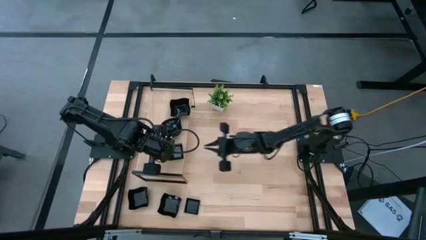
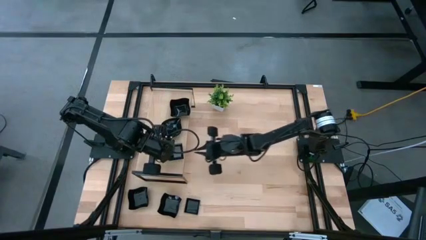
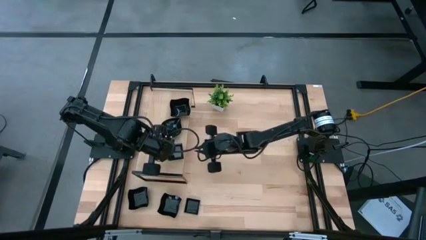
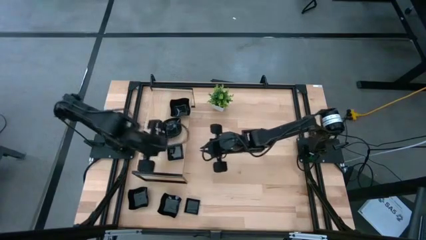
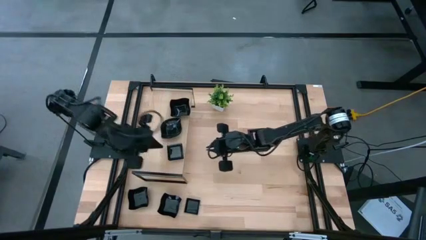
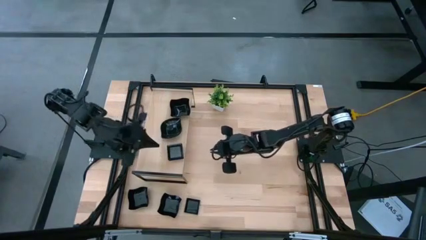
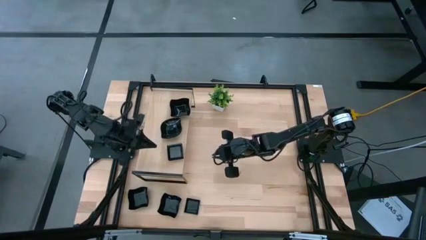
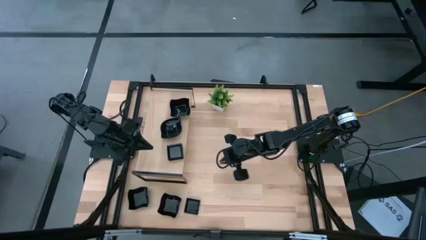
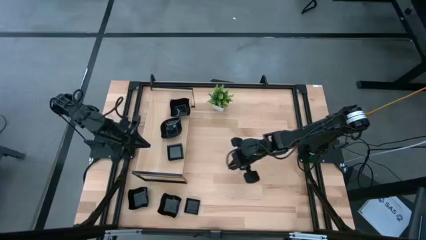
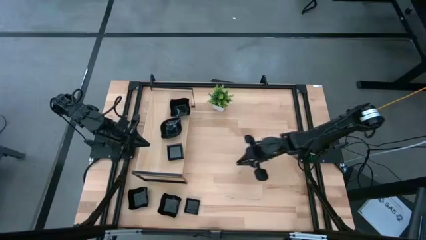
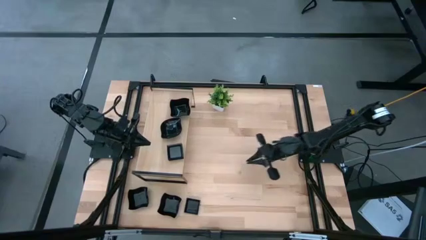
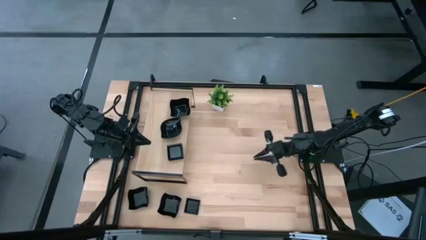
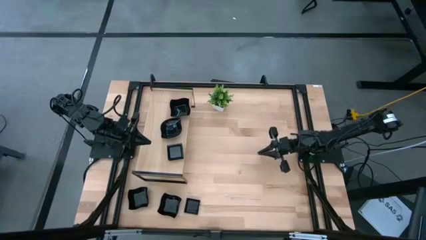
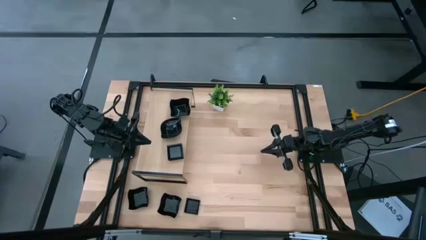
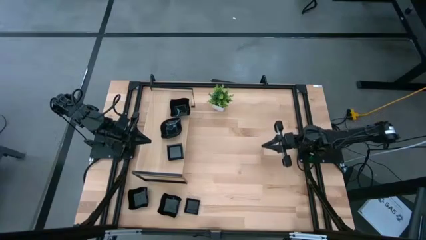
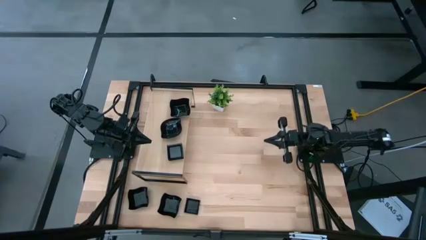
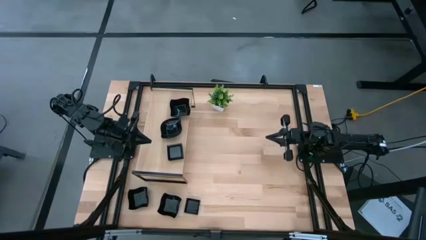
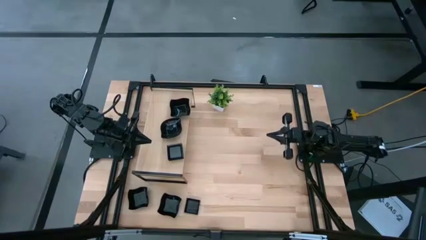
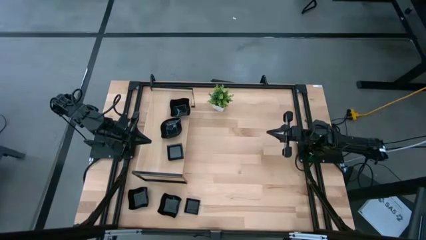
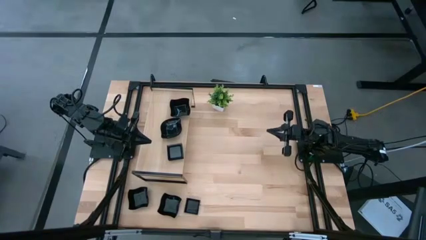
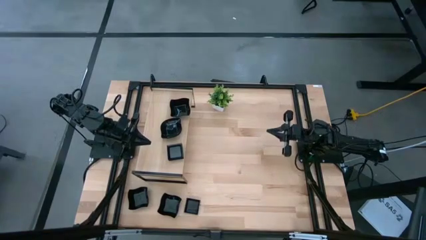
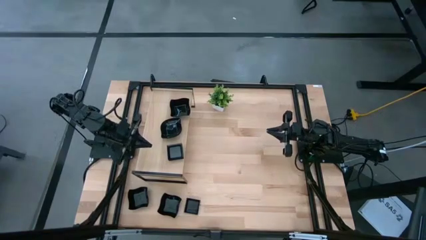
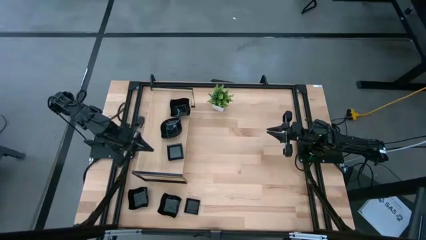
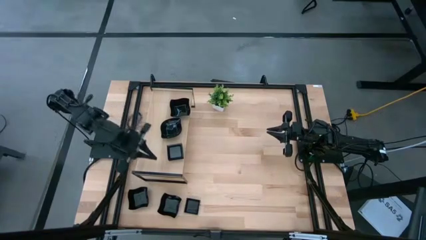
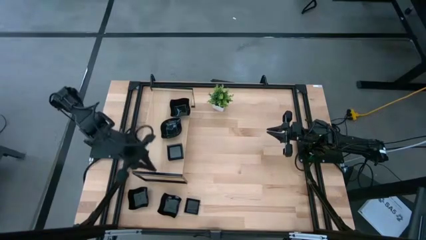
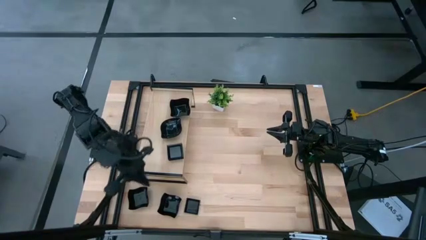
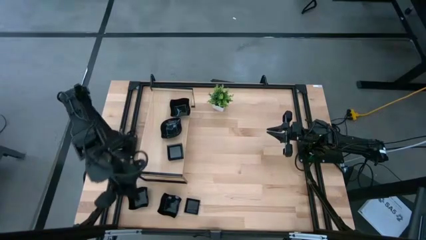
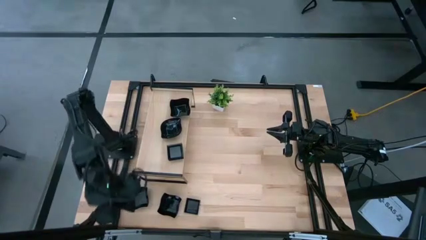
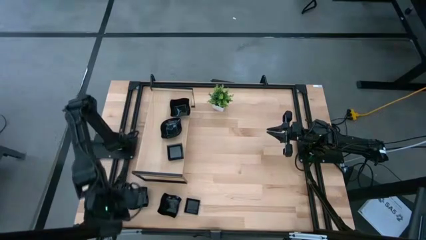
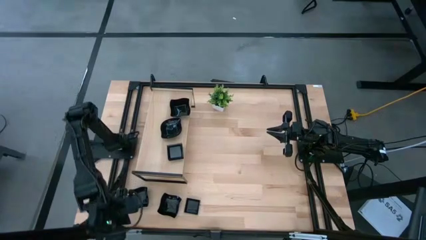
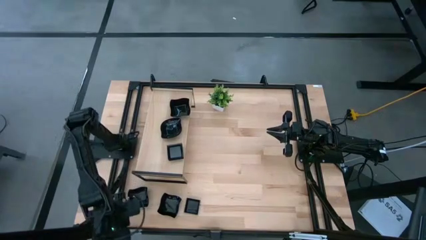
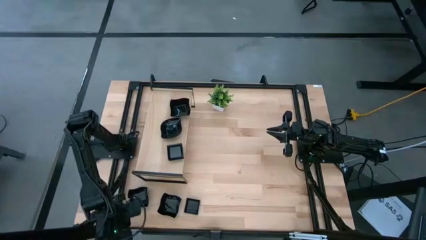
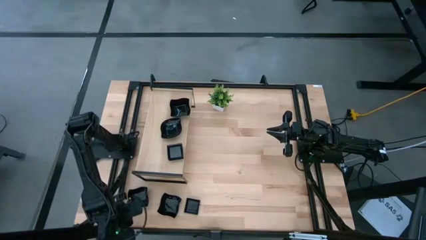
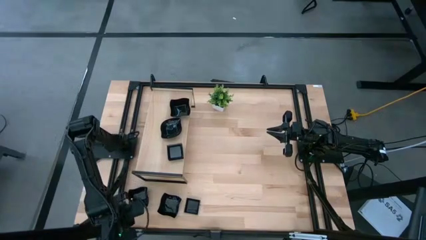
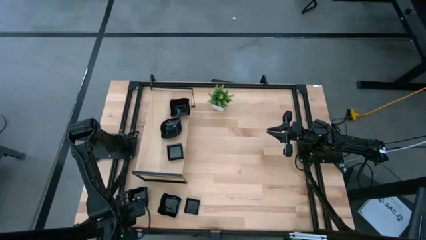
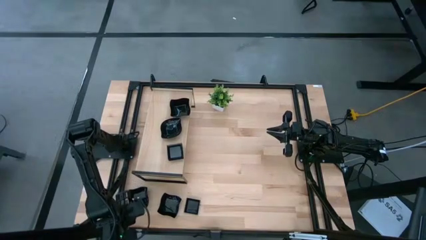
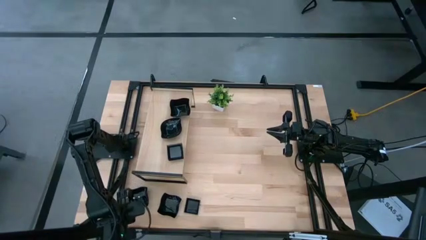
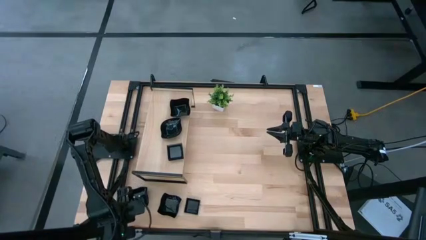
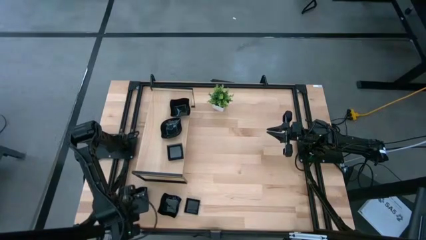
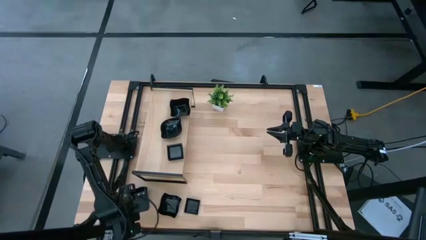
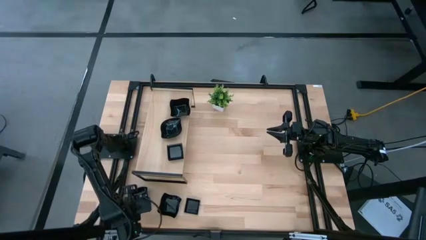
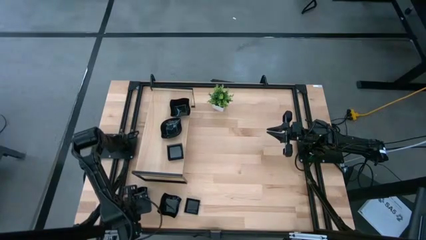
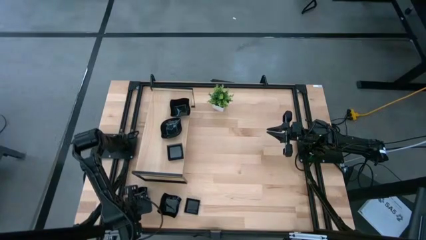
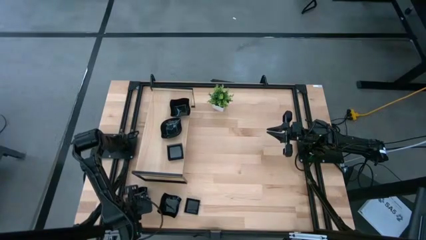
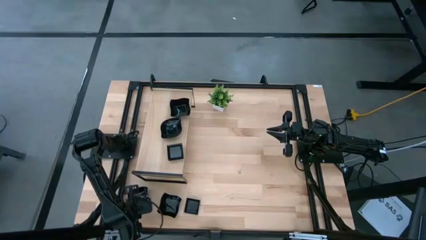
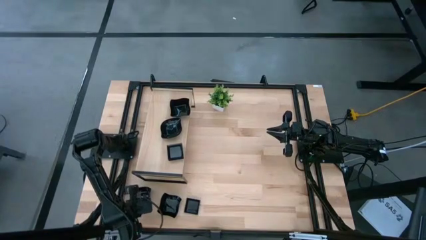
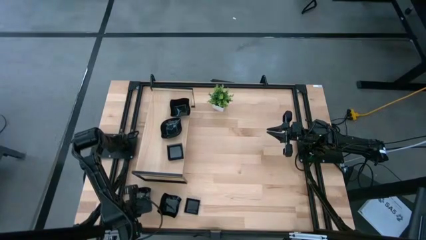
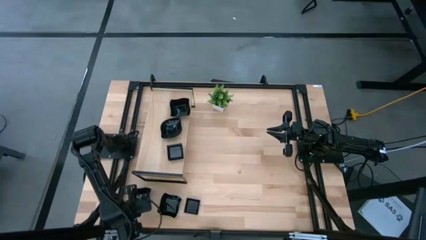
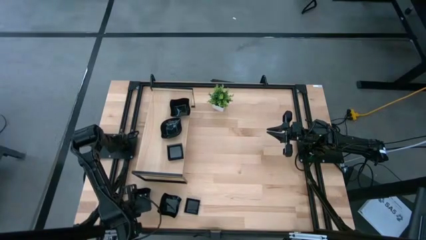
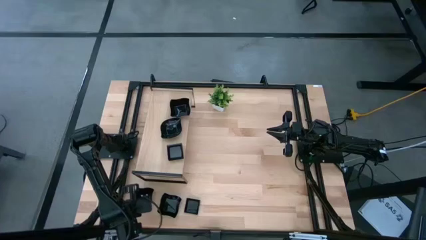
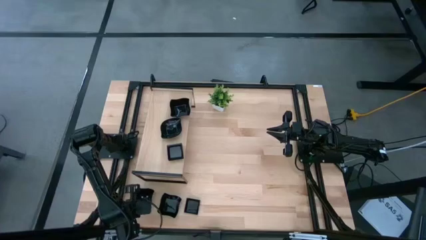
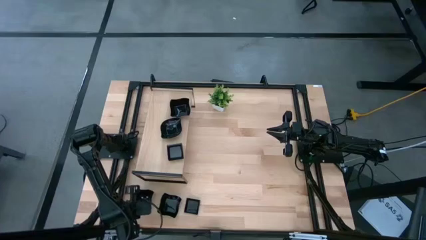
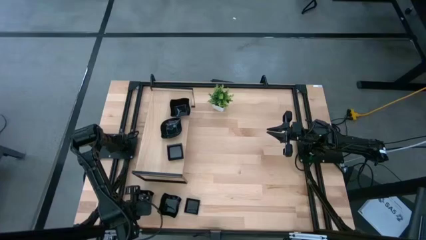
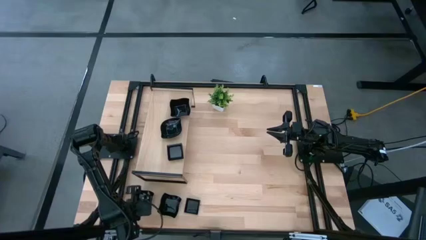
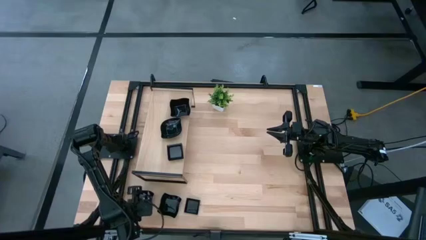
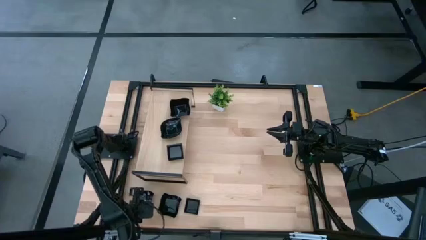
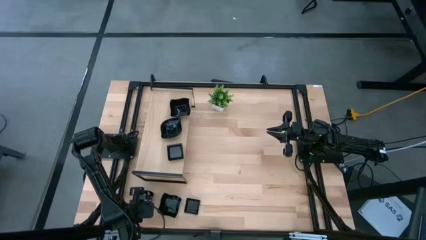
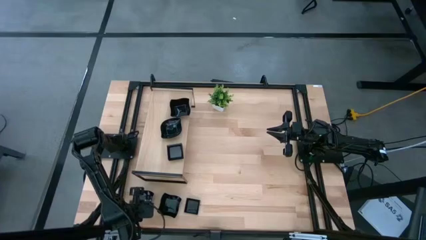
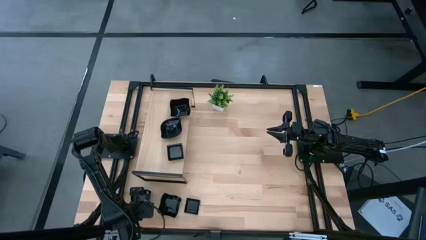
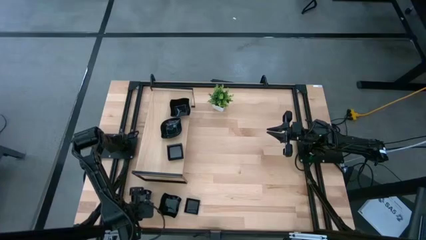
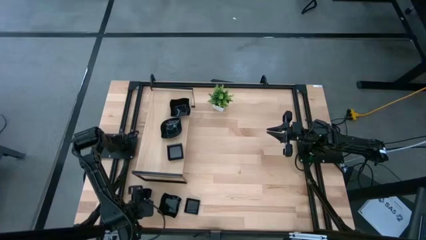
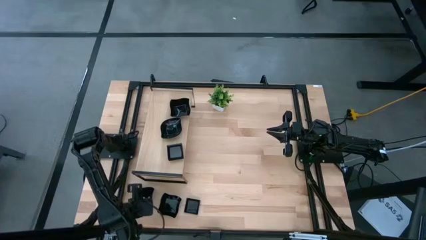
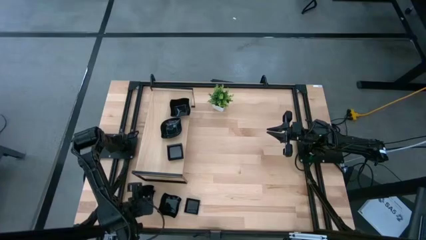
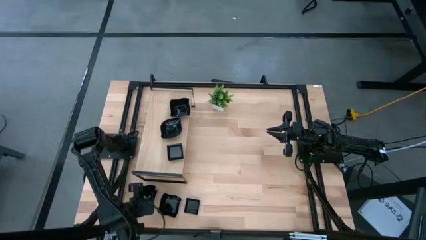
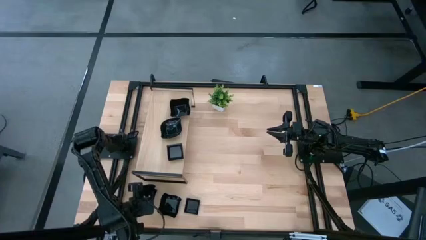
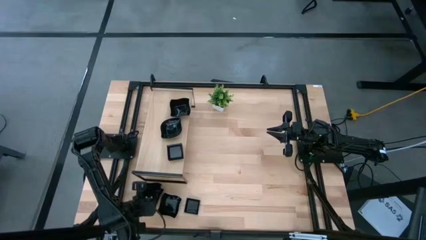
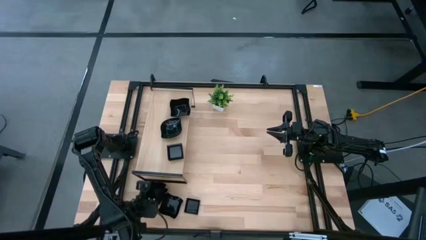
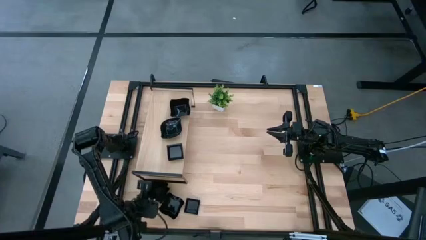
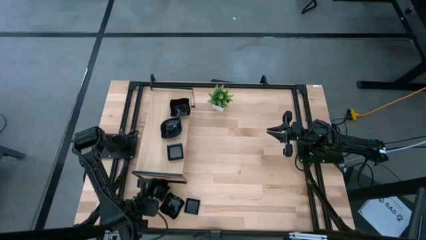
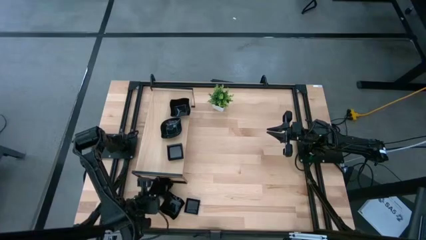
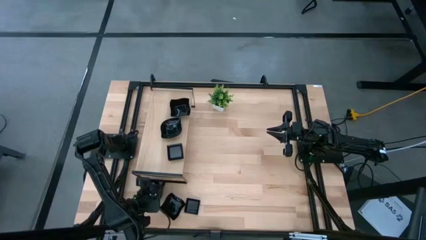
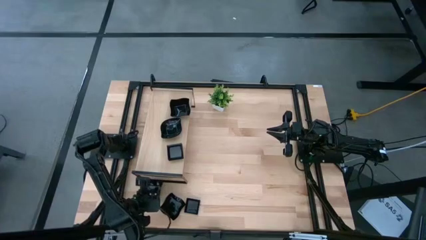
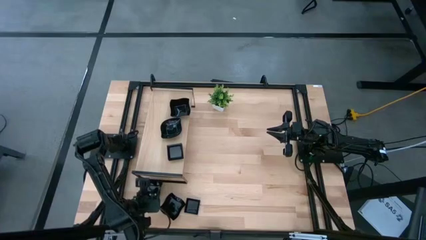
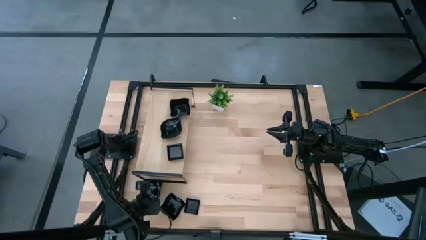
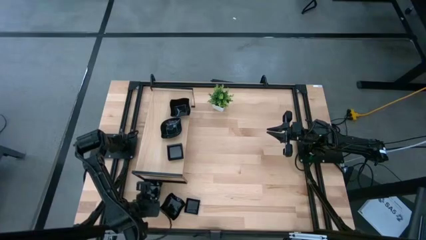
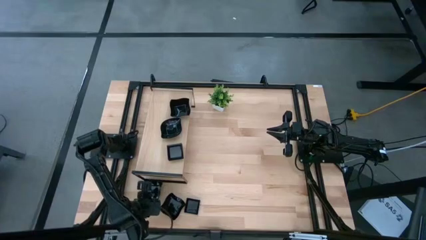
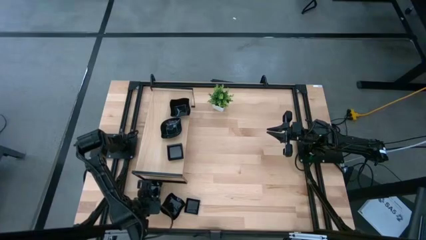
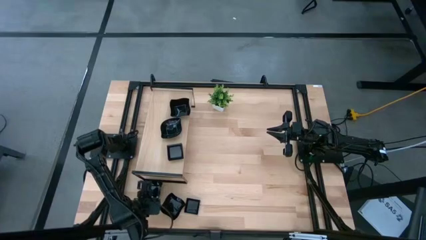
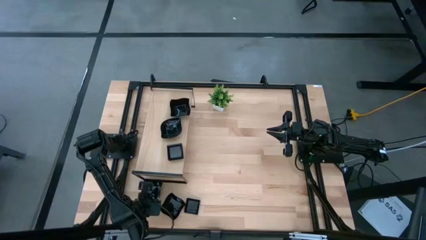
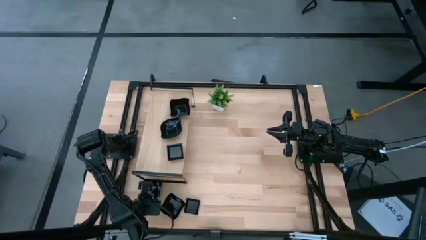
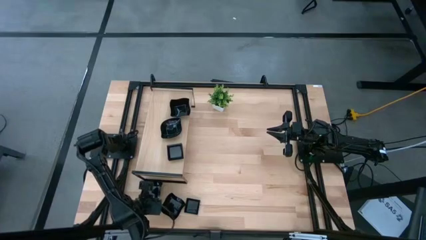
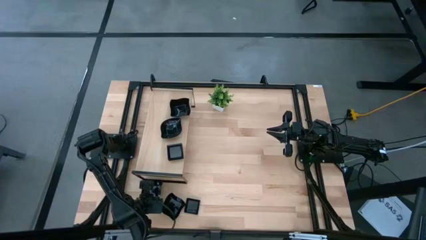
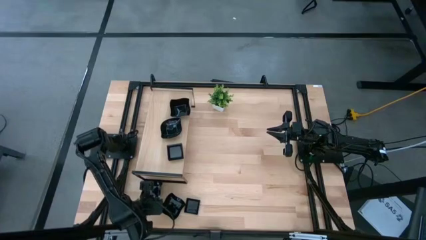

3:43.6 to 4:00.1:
Task: Pick & Place Mini shaped plates
Stack the black distorted square plate on top of the black distorted square plate on the shelf

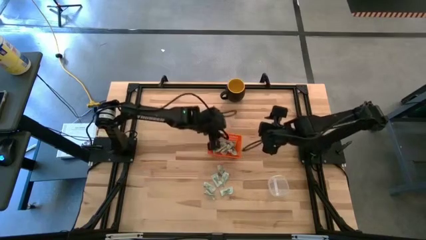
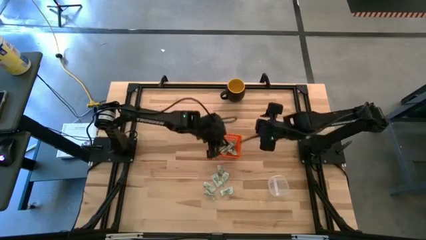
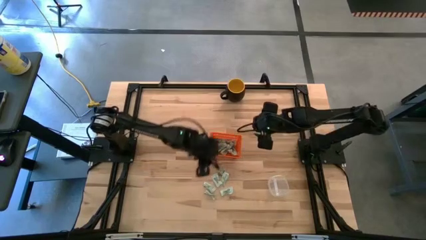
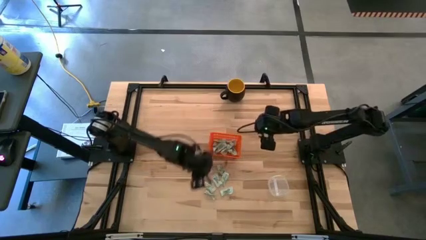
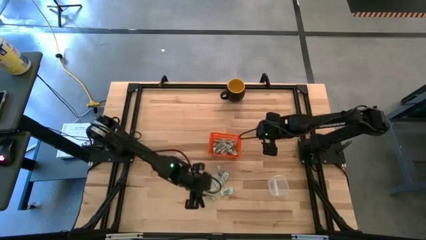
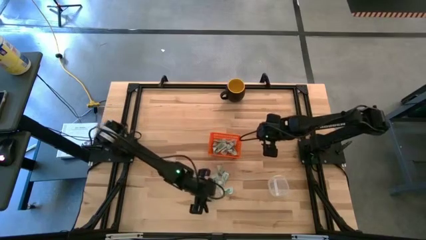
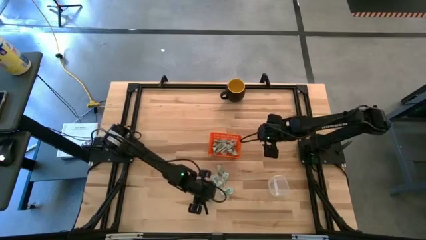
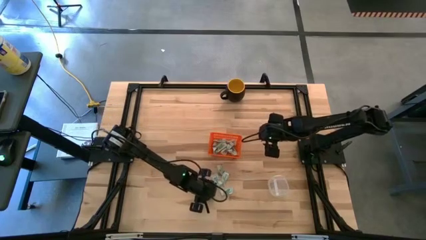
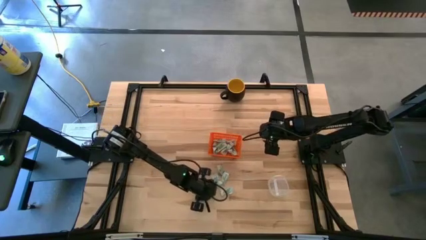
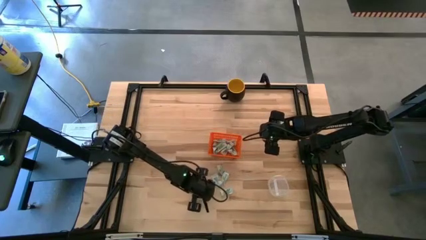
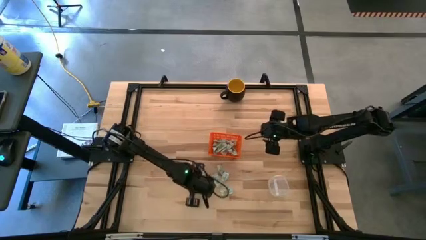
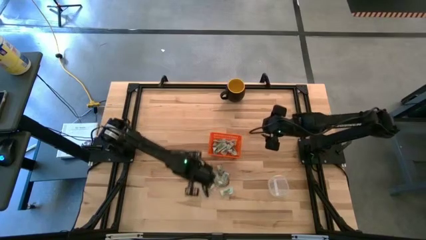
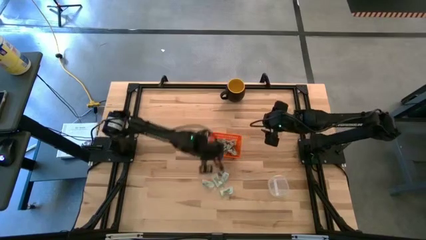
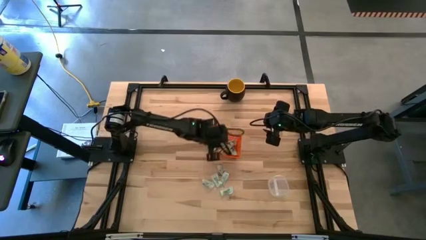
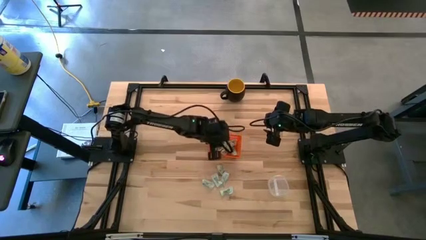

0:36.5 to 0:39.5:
Task: Pick and place items into bin
Put the light green stevia packet into the orange bin
